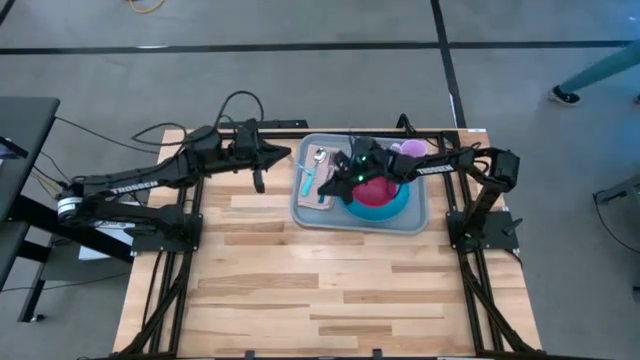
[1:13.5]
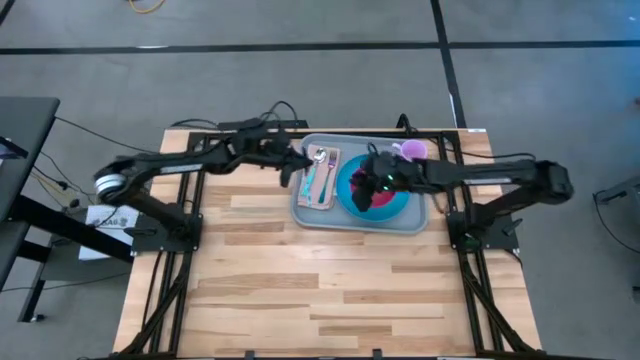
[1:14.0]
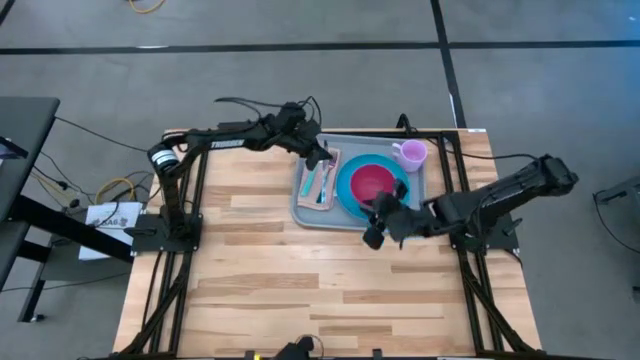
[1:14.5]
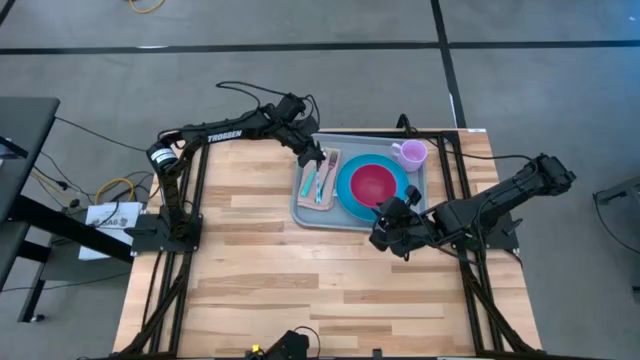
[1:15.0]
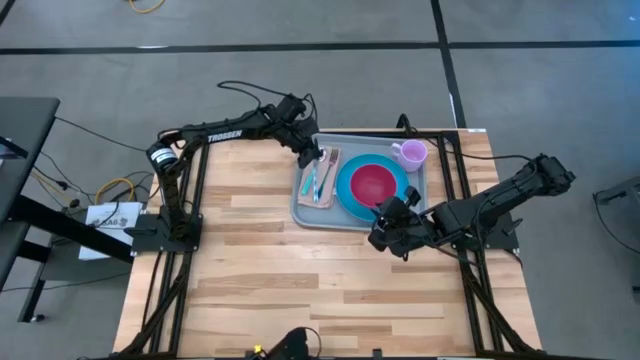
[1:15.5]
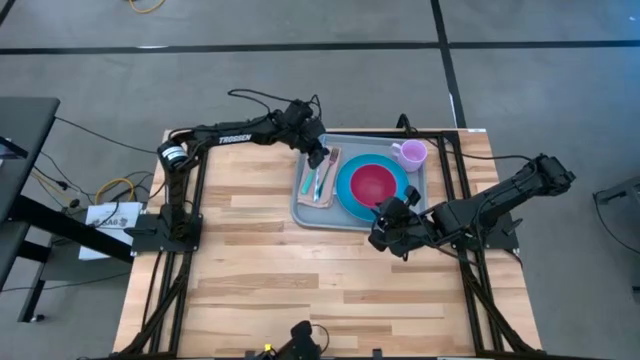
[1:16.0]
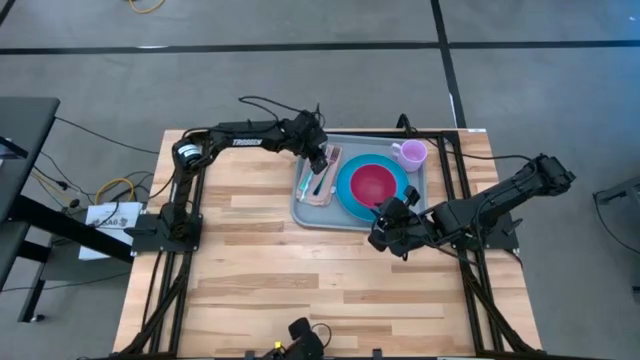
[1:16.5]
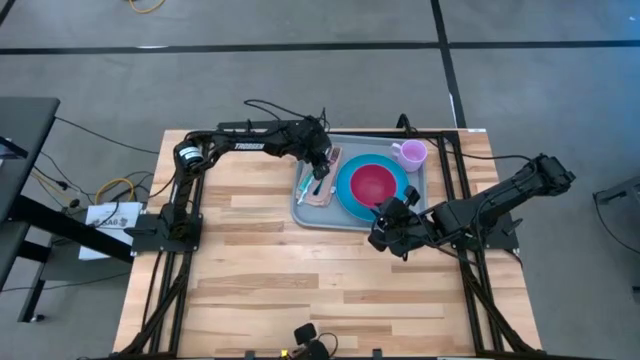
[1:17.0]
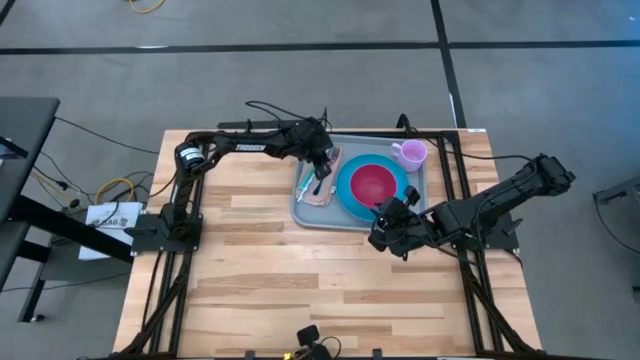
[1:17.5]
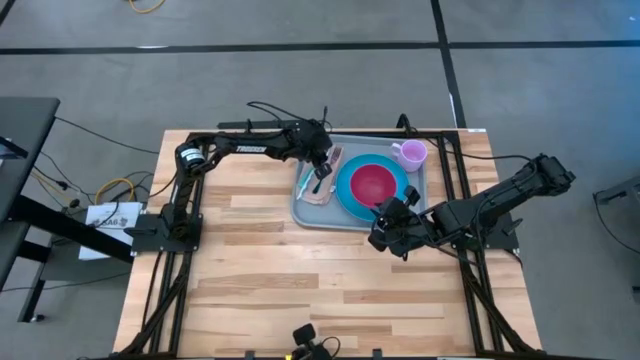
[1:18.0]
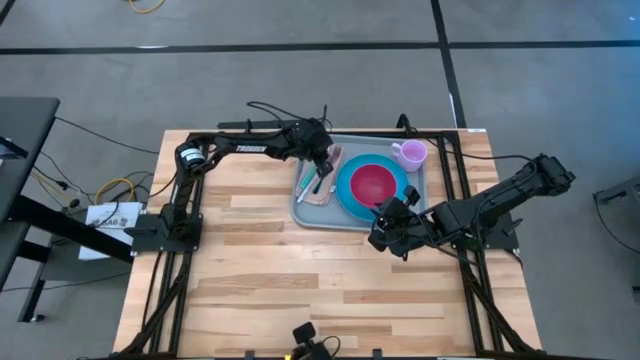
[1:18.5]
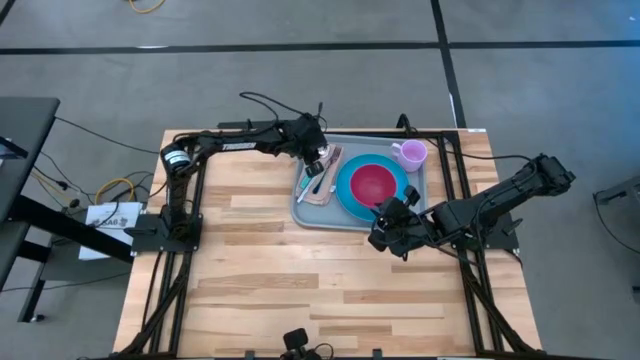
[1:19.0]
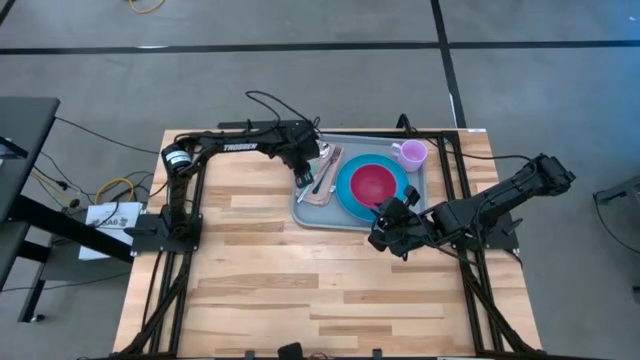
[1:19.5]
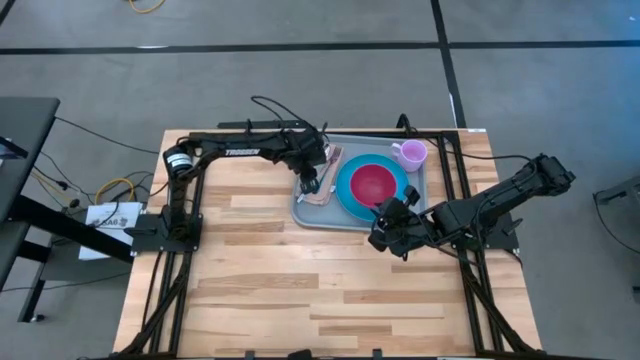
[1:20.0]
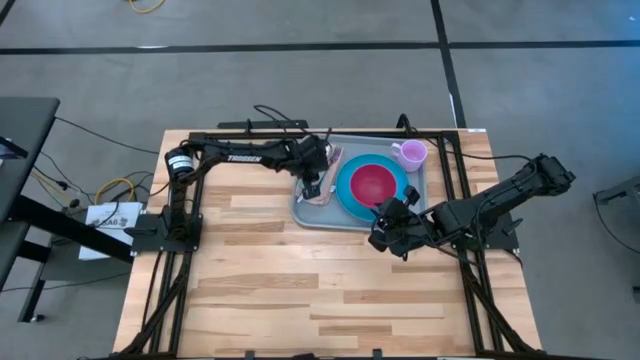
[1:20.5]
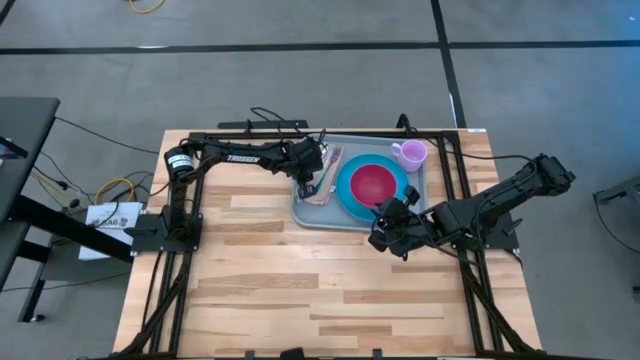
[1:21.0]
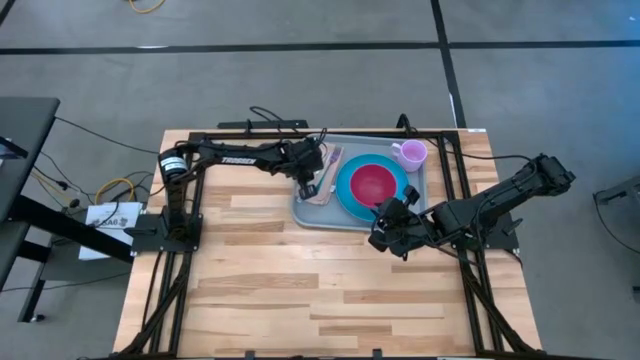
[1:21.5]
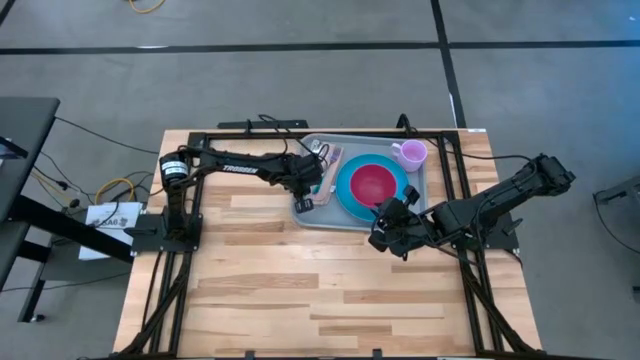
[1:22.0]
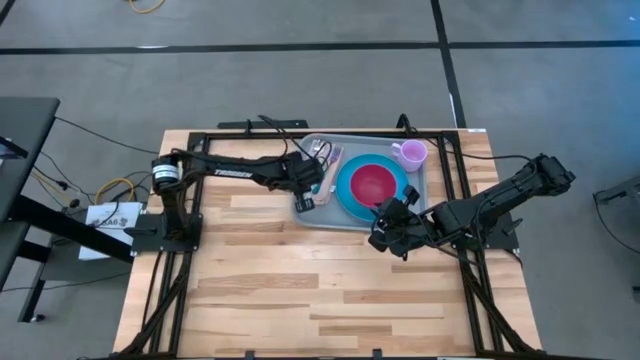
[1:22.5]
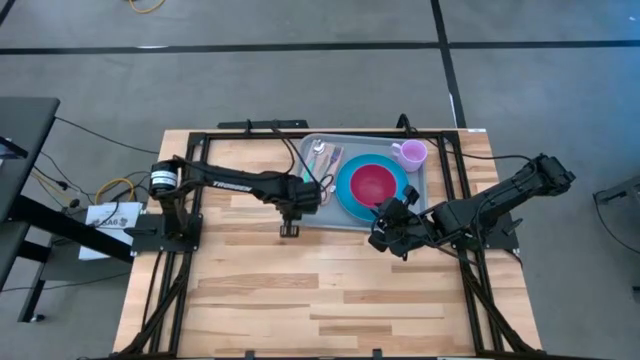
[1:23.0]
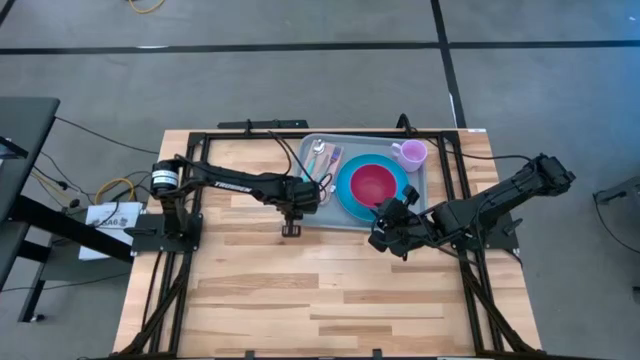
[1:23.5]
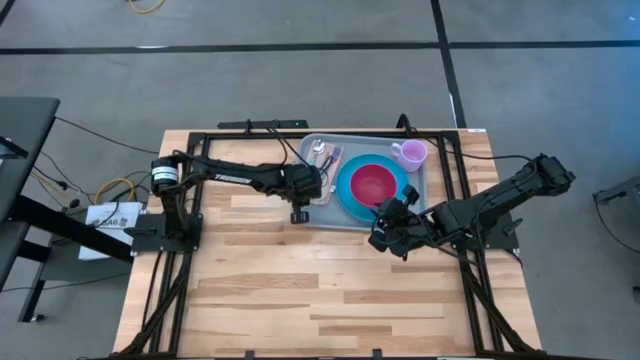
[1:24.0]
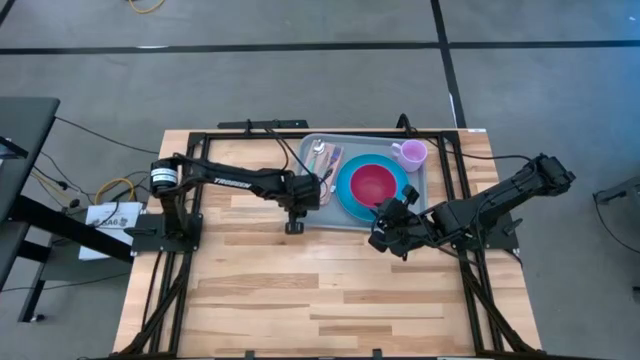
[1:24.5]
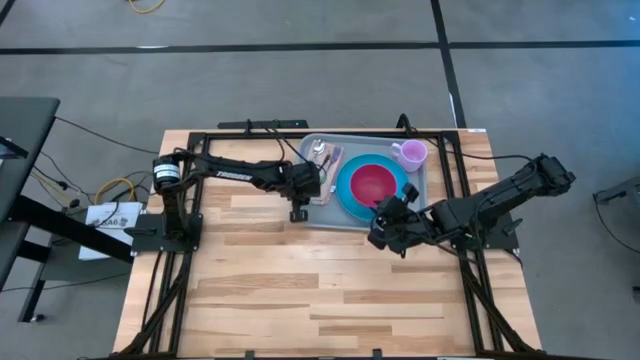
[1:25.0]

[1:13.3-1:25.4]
Task: Set up tray
Put the white patterned knife on the brown napkin to the left of the blue fork

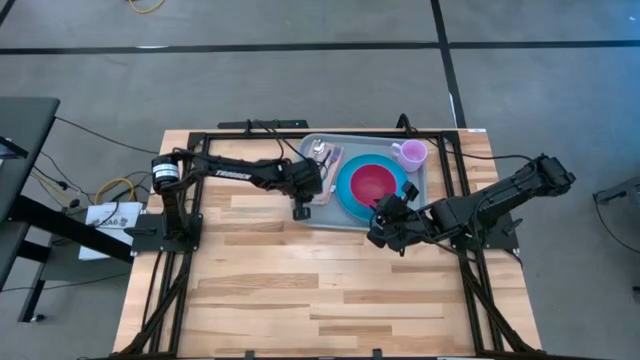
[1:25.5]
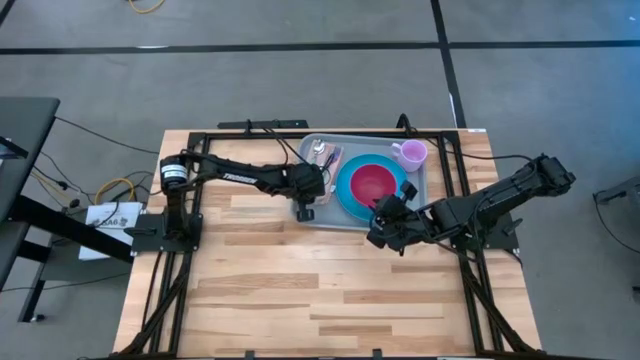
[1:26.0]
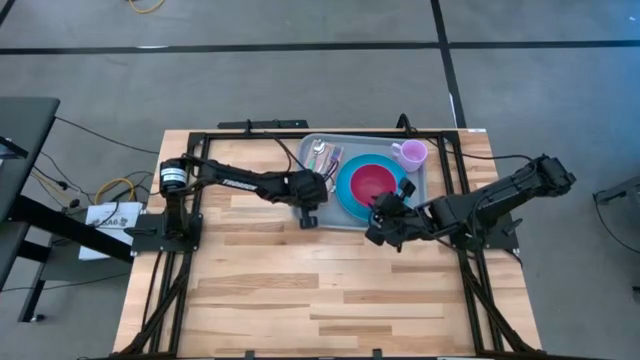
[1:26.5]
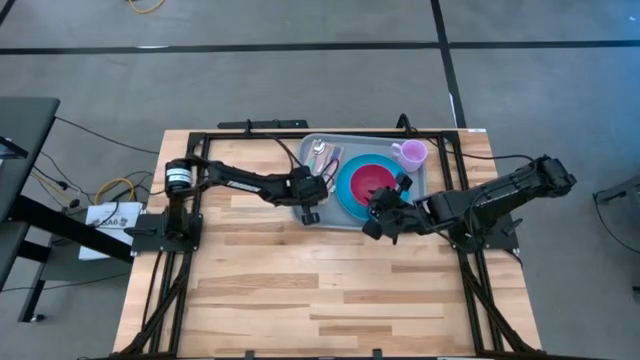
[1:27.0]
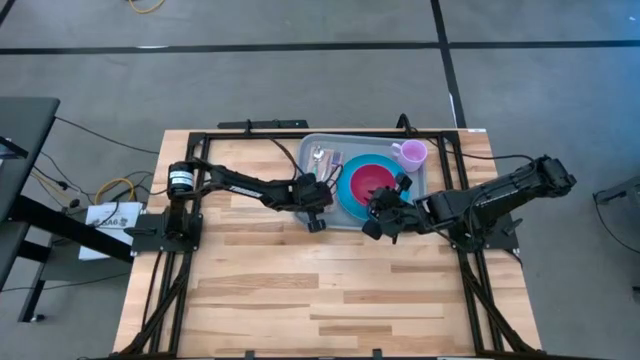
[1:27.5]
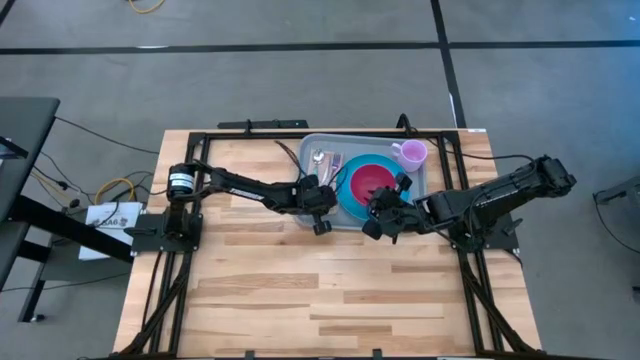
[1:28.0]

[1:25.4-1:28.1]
Adjust the brown napkin on the gray serving tray

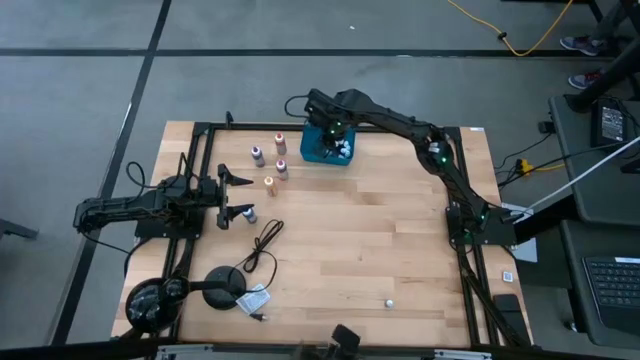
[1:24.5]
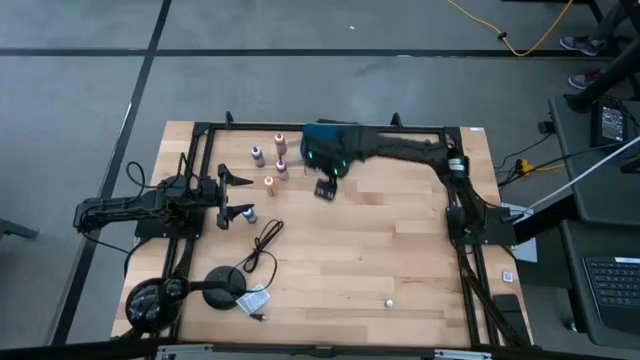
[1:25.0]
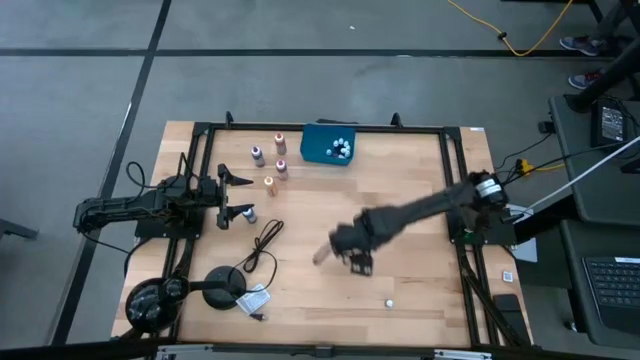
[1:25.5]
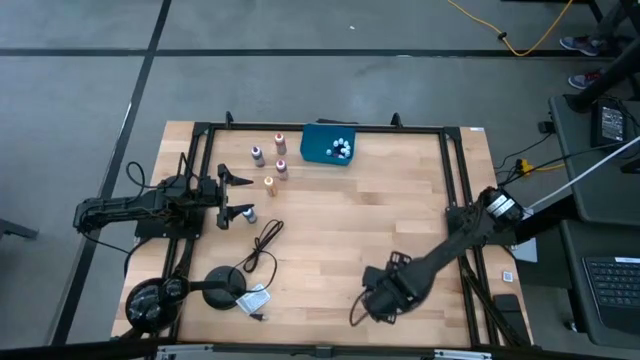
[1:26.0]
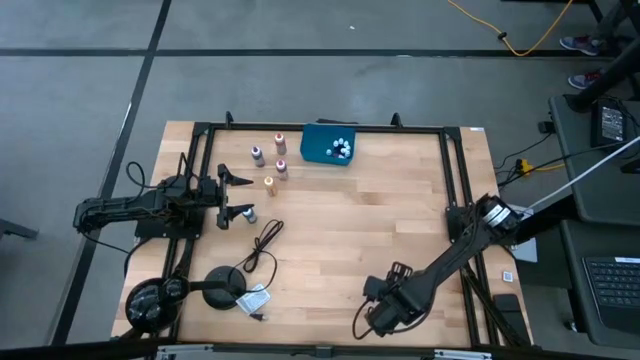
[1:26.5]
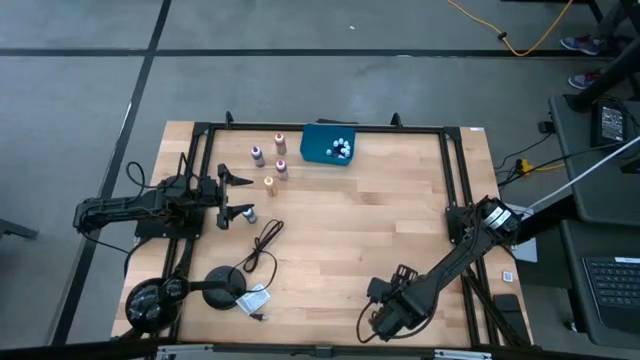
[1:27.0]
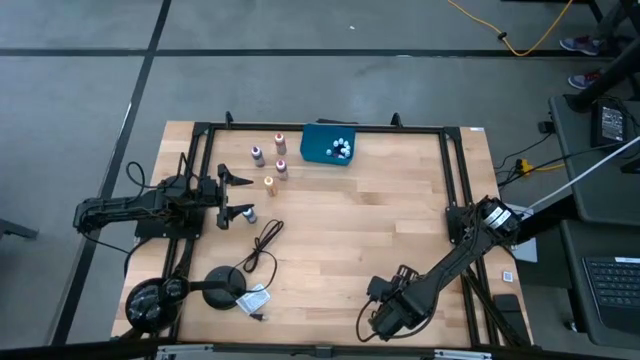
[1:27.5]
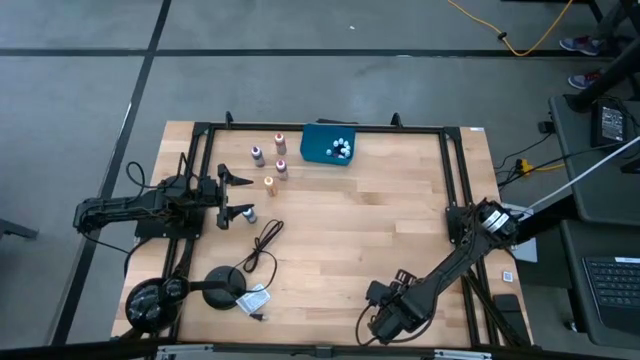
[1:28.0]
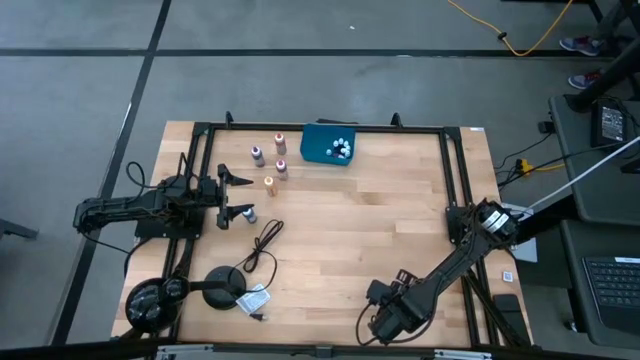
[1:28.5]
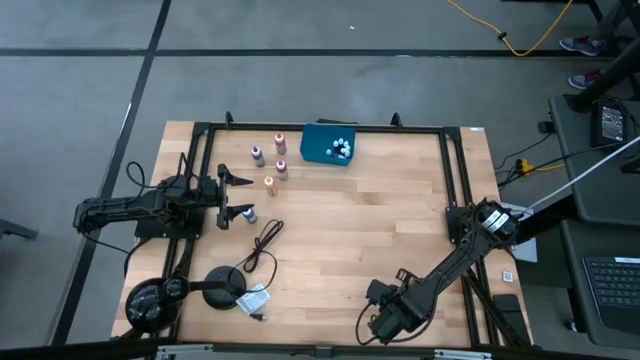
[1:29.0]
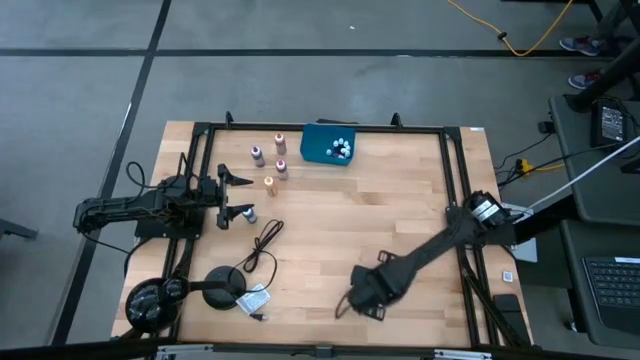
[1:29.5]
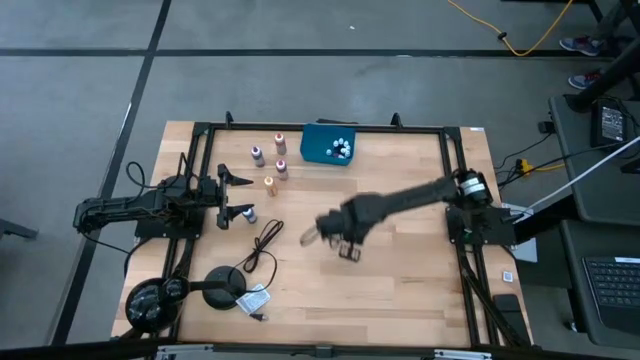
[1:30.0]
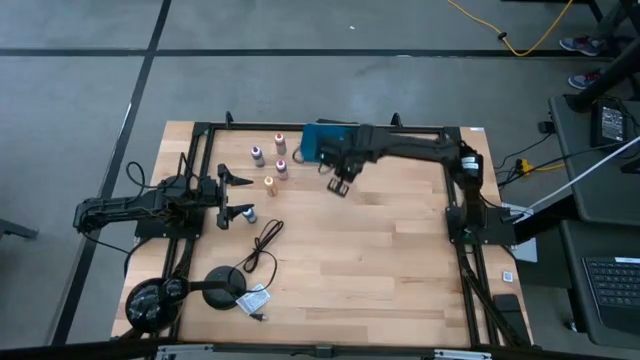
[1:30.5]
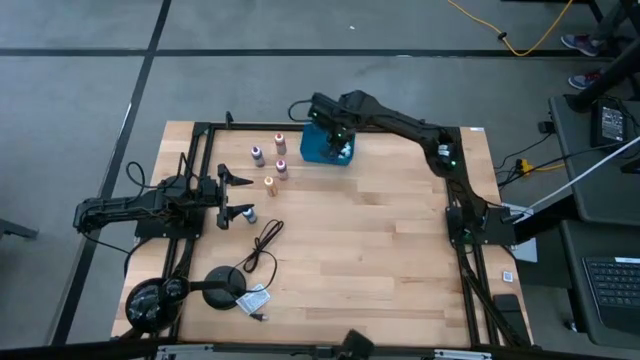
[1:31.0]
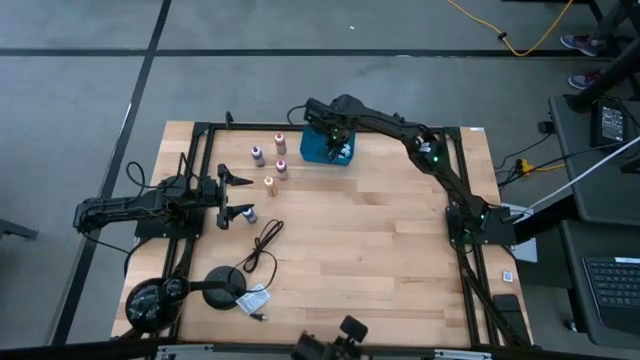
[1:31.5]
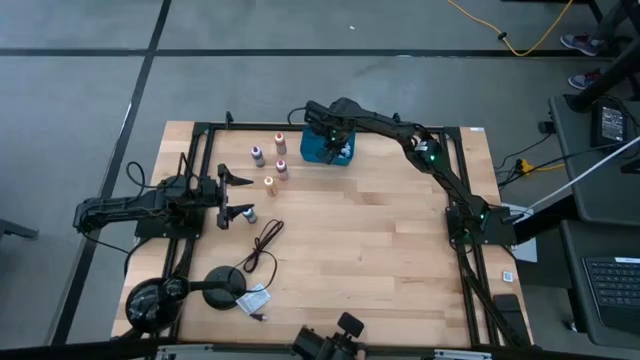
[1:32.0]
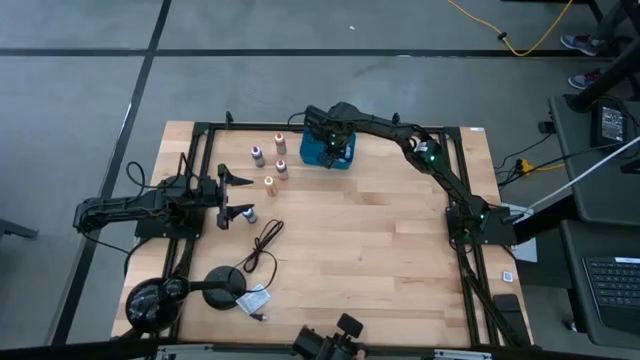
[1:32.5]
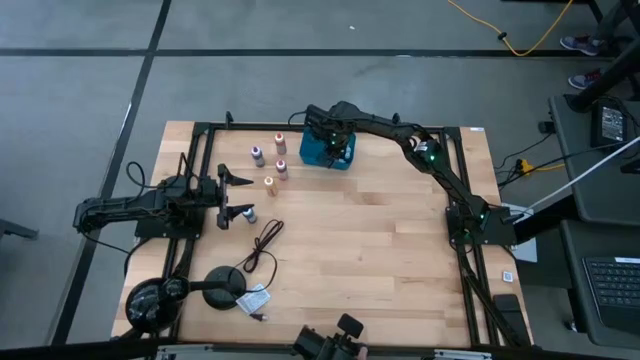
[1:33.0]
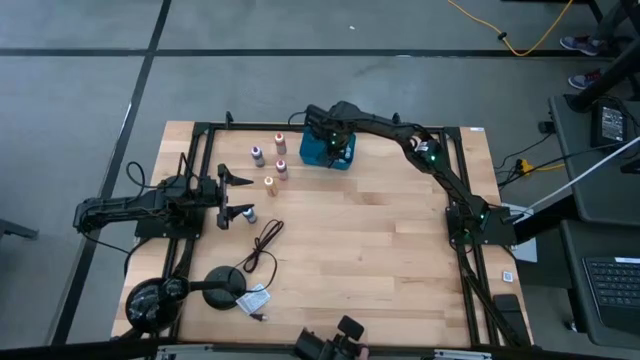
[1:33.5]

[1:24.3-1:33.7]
Task: Pick & Place food coloring
Put the small red food coloring bottle into the blue container
